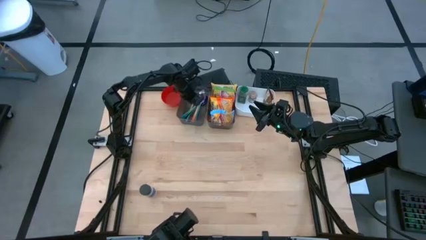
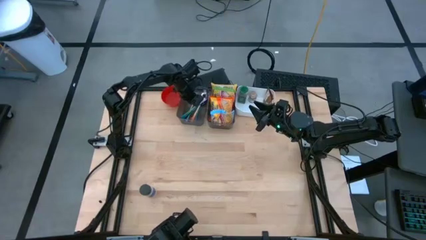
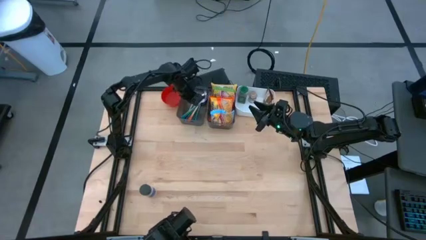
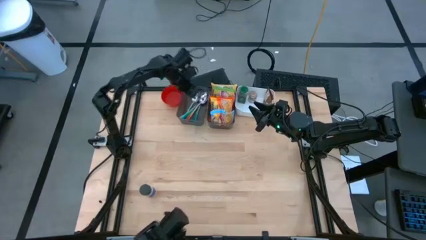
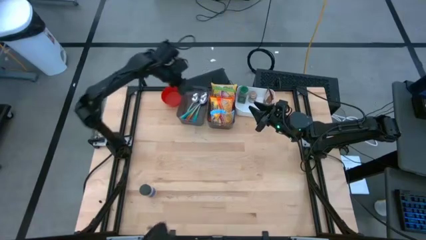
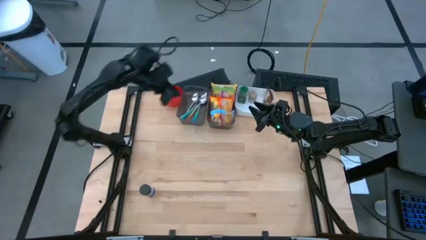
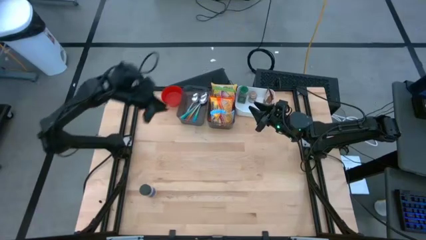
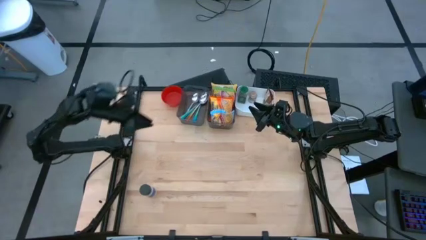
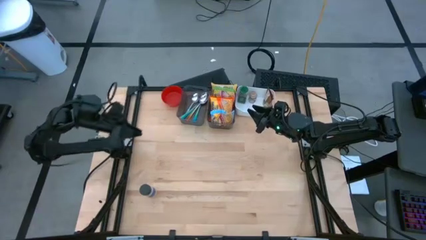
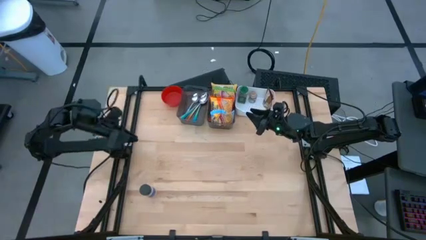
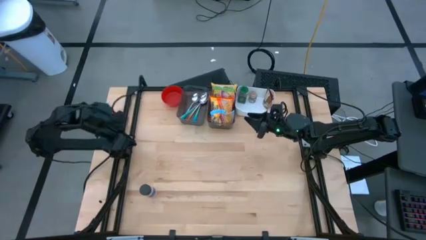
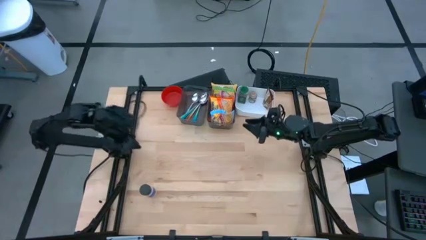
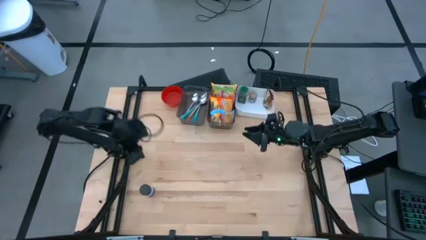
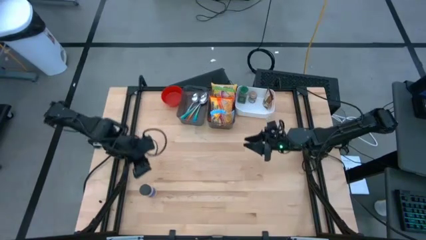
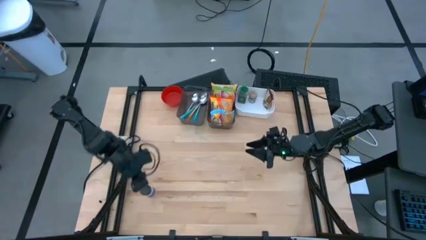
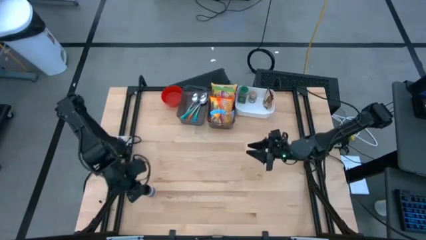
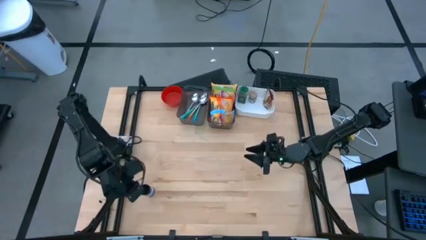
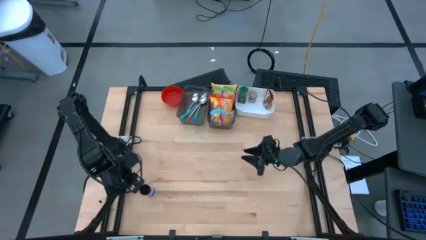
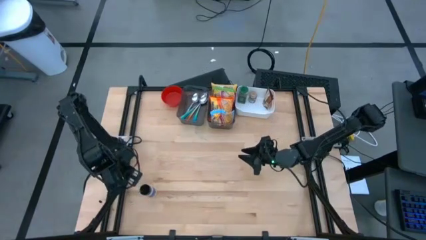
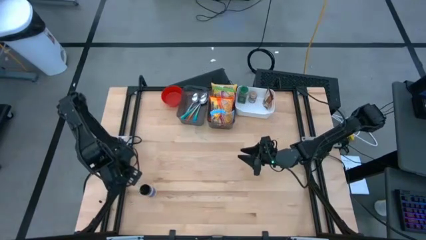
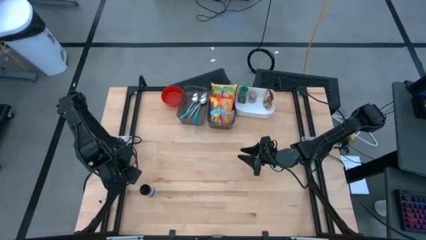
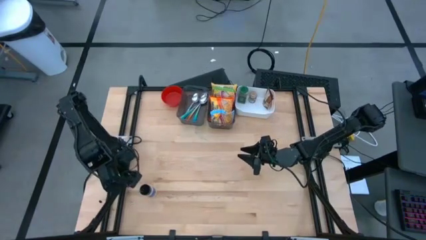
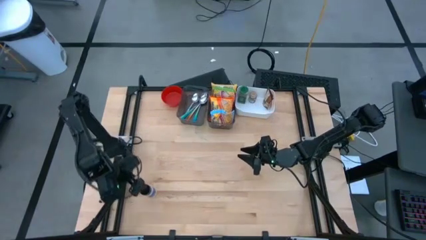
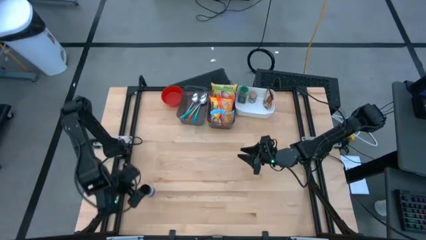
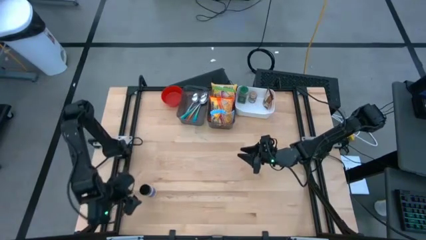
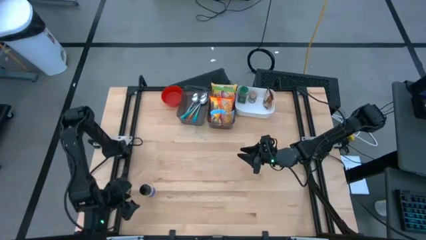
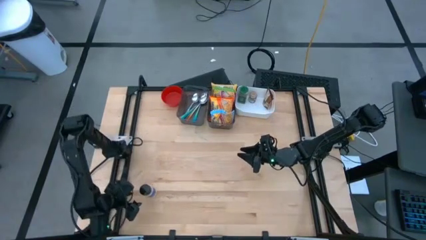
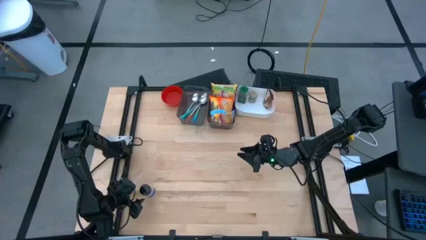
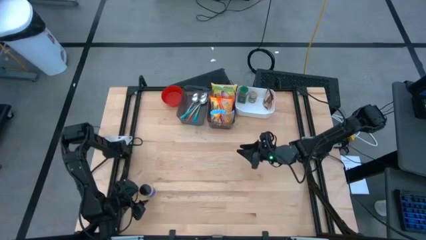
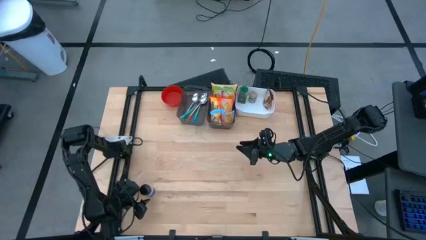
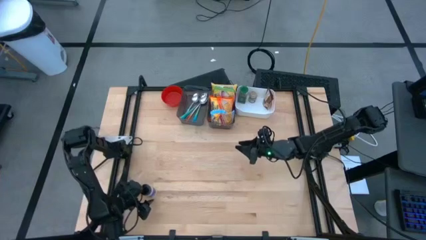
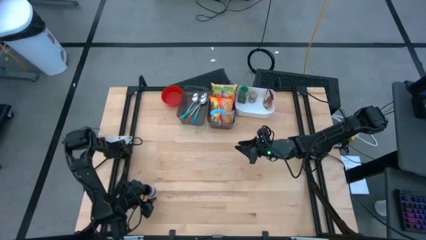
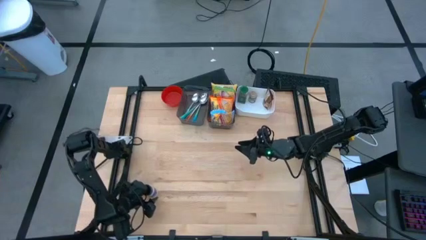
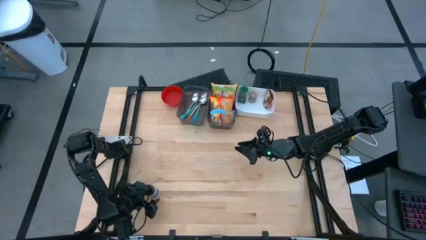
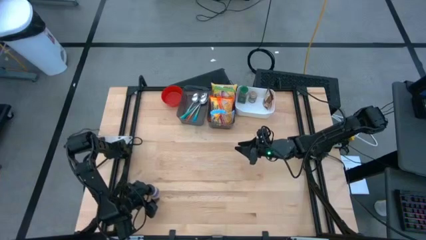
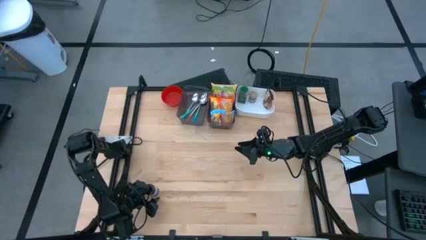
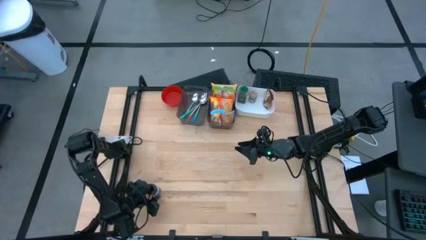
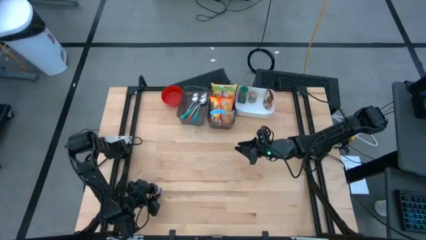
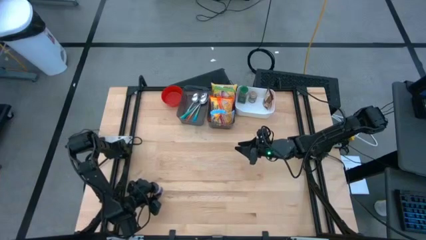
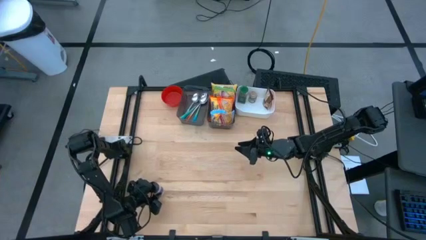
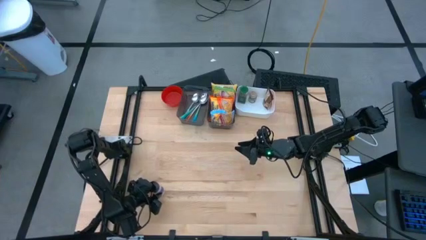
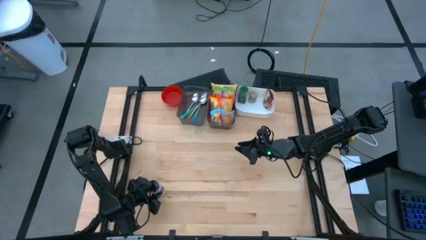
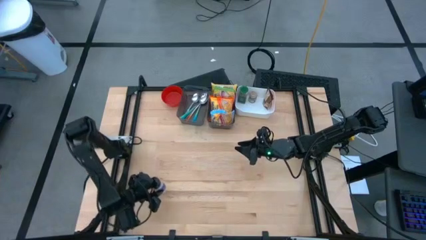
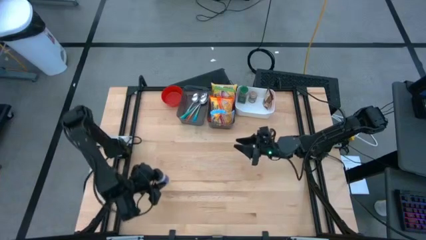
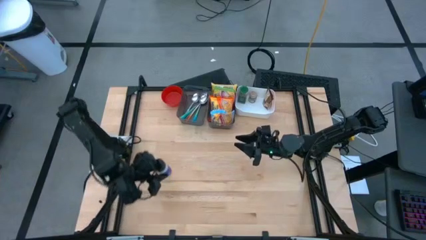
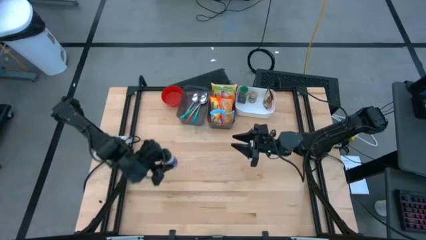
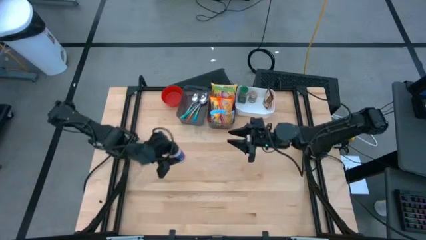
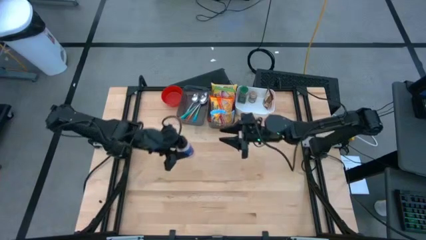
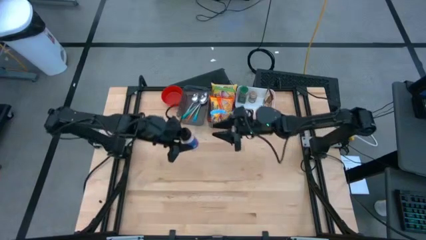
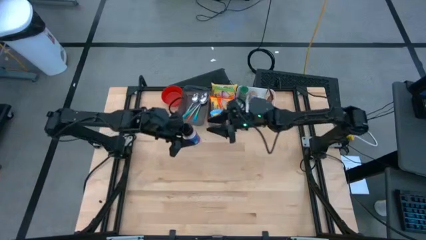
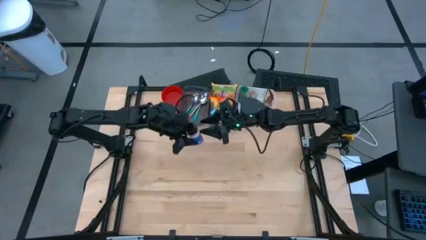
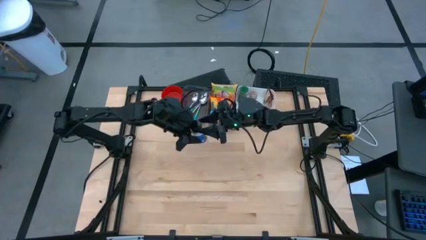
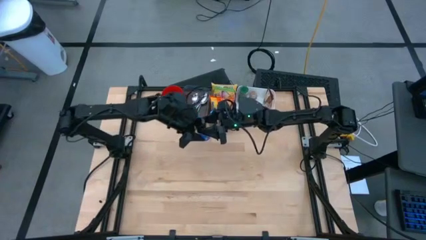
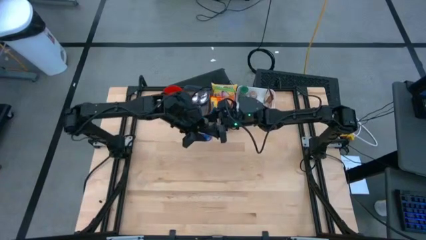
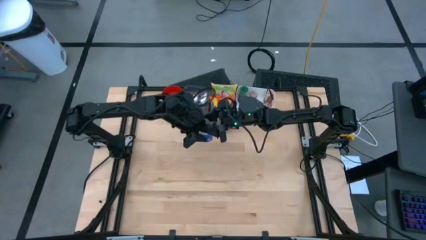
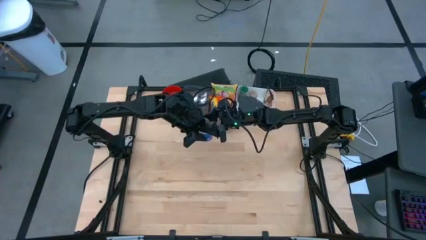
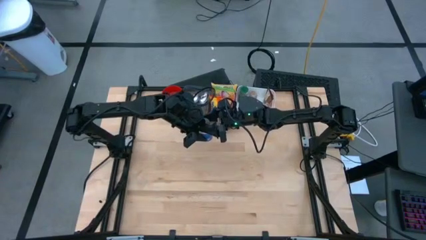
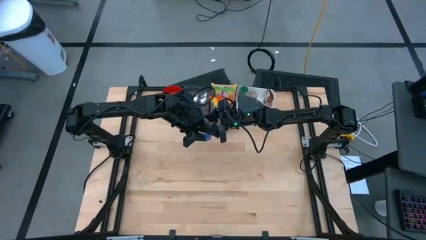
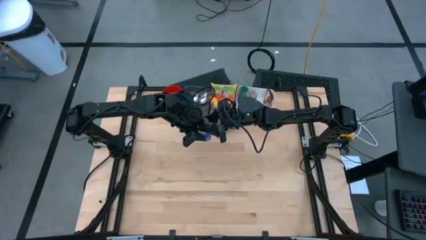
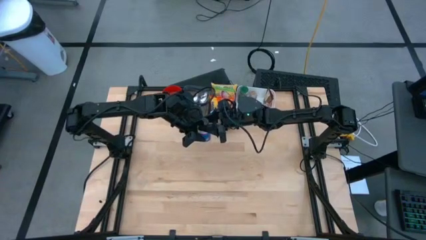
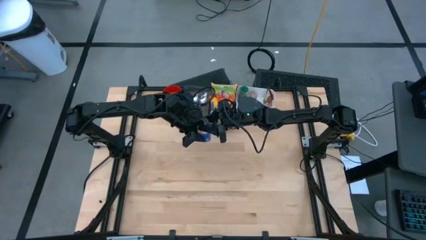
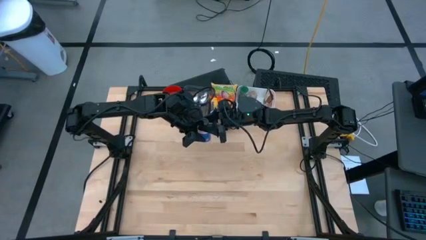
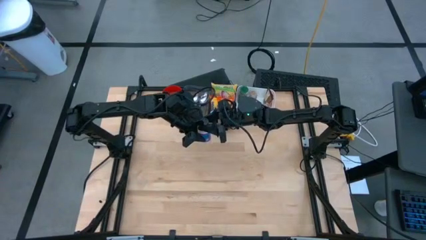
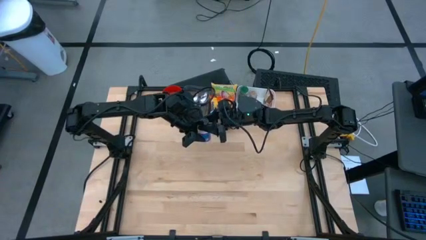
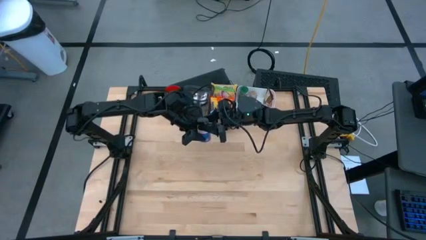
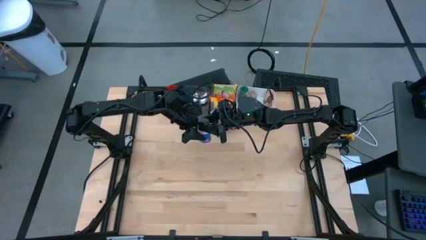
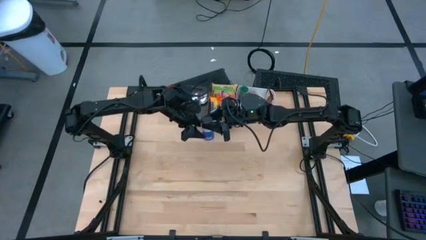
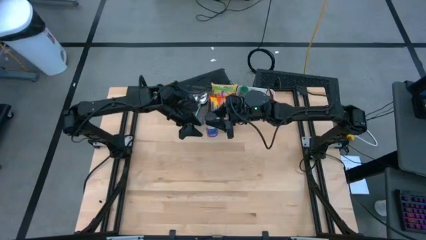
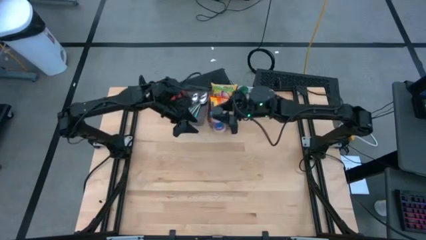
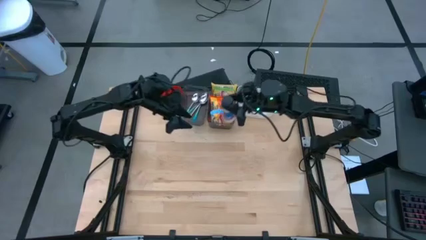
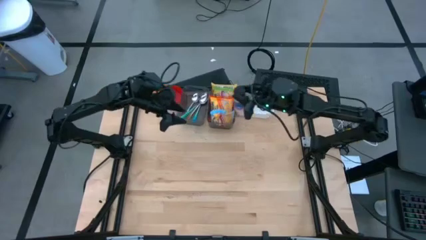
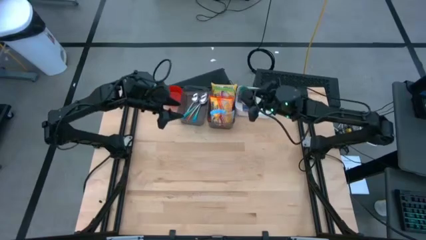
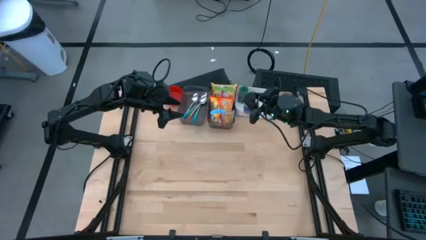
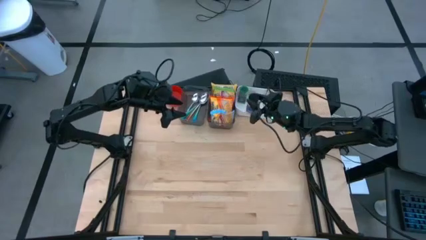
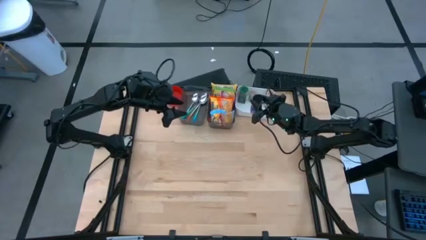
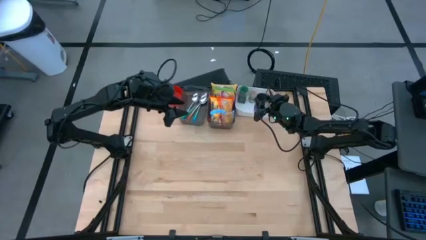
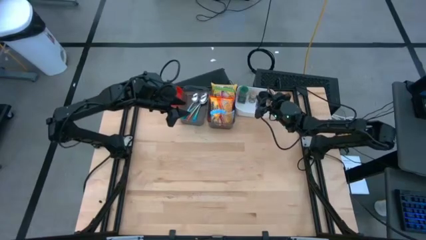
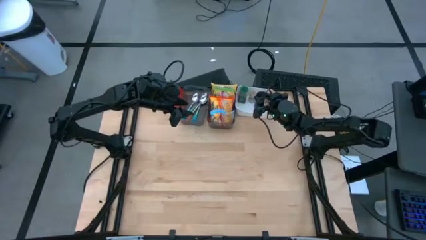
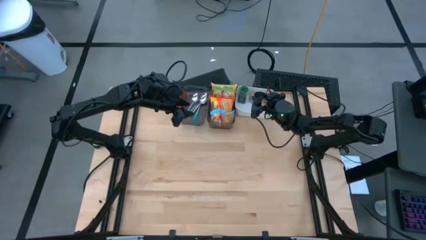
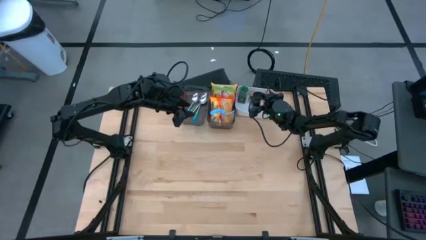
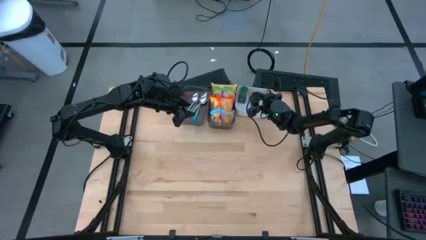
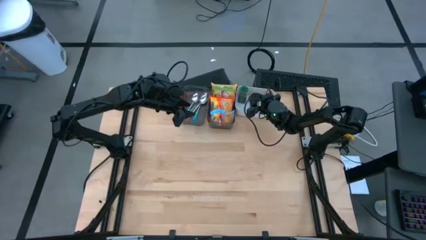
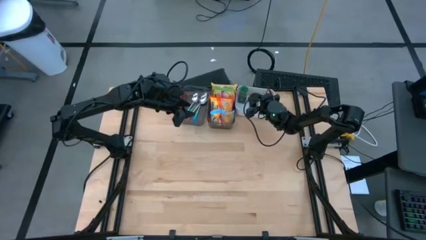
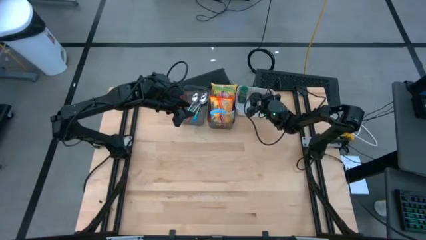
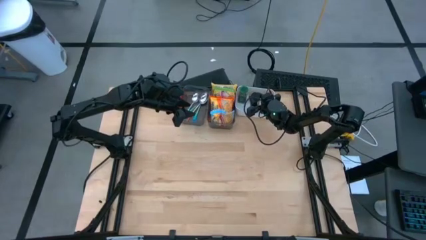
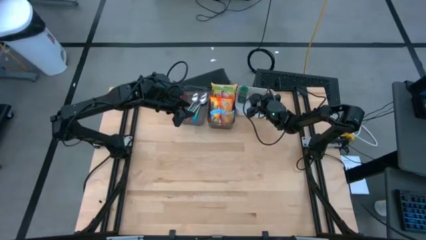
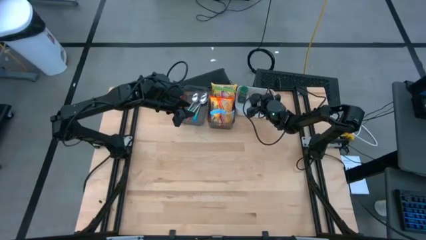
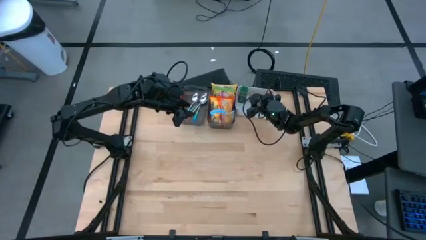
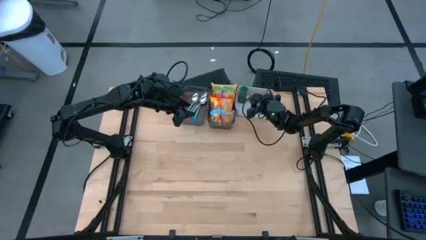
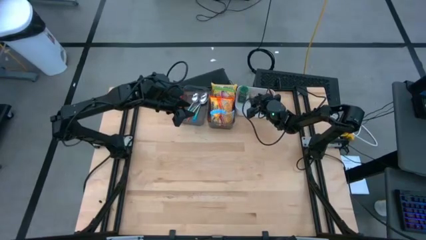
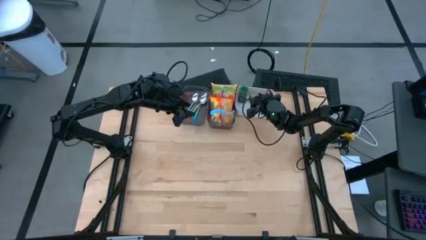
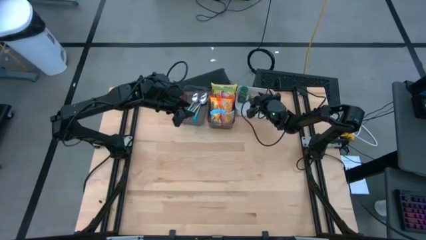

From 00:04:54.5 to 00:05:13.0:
Task: Pick & Place Food Item
Put the purple seasoning bottle into the white bin
